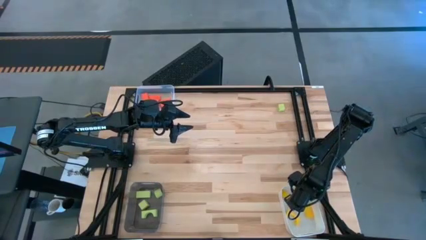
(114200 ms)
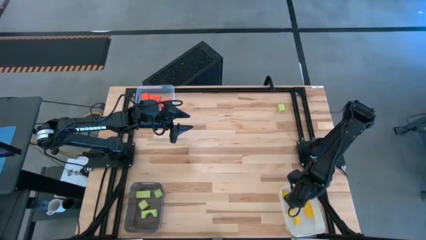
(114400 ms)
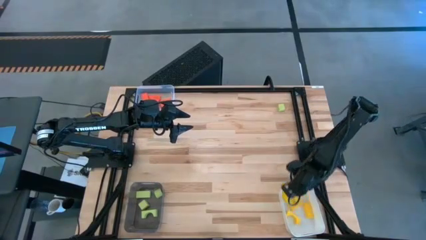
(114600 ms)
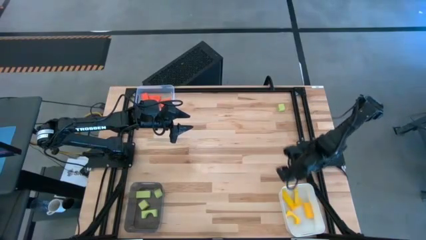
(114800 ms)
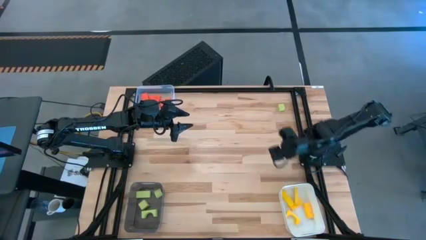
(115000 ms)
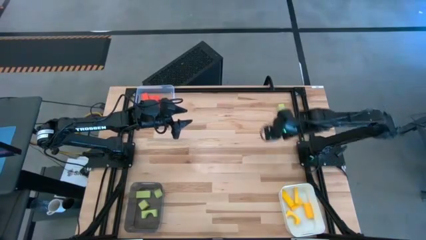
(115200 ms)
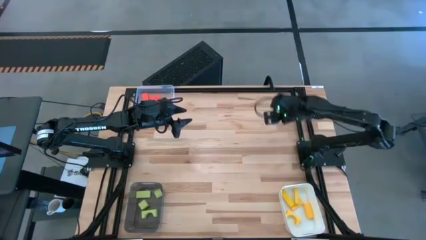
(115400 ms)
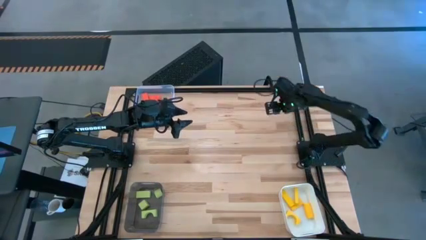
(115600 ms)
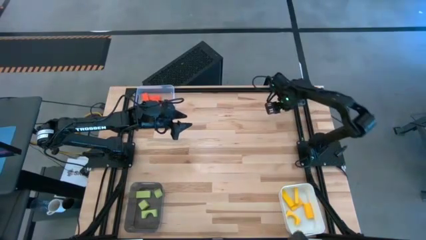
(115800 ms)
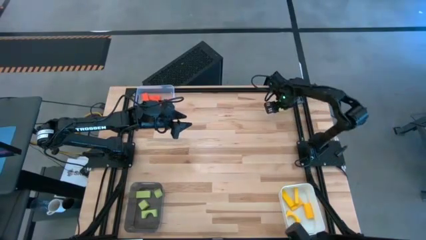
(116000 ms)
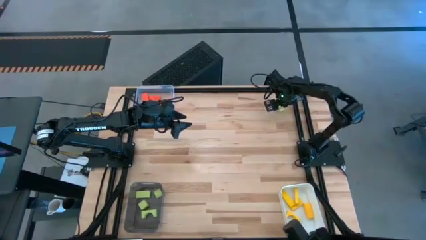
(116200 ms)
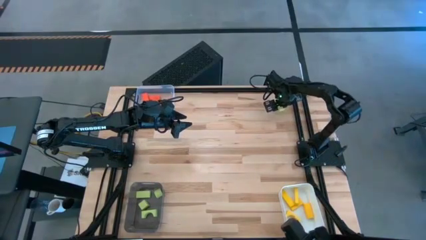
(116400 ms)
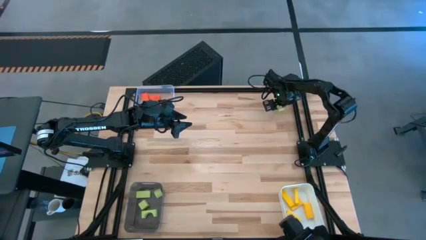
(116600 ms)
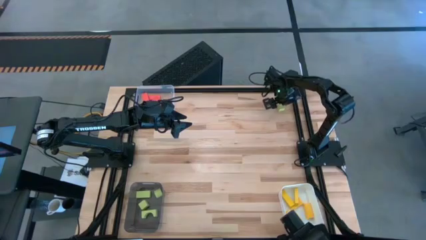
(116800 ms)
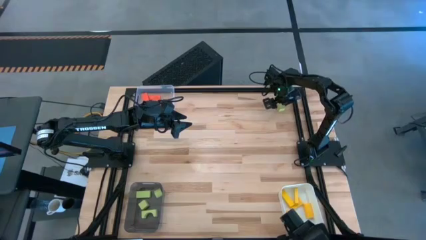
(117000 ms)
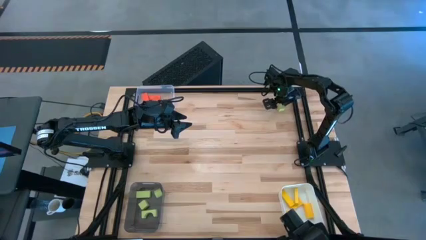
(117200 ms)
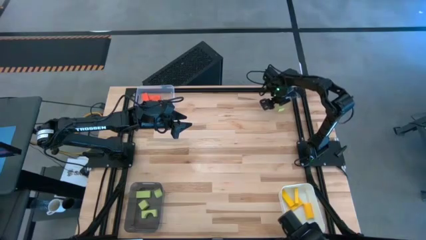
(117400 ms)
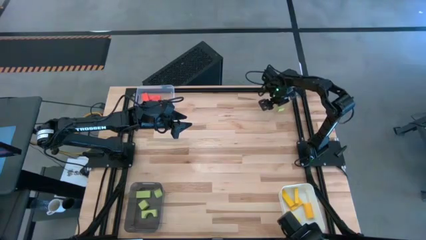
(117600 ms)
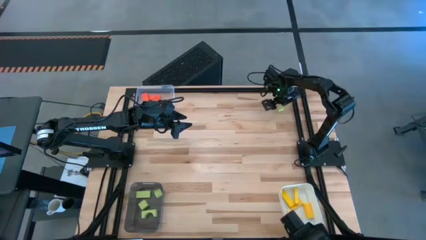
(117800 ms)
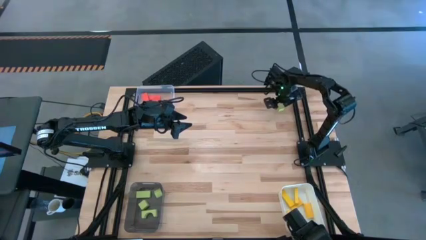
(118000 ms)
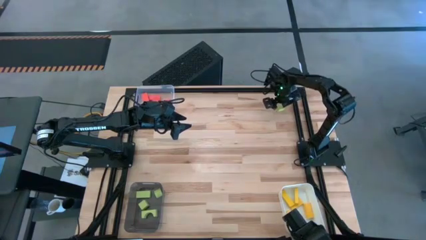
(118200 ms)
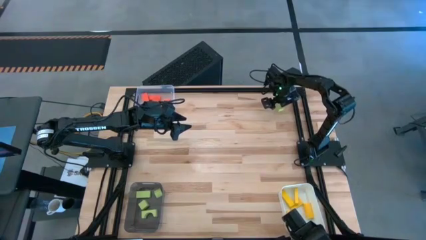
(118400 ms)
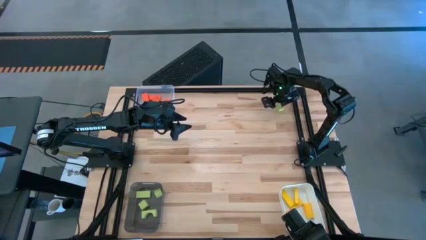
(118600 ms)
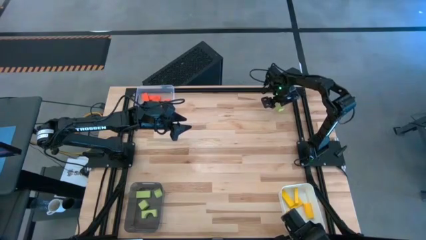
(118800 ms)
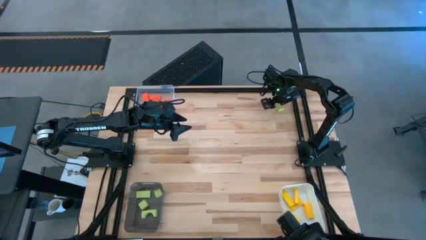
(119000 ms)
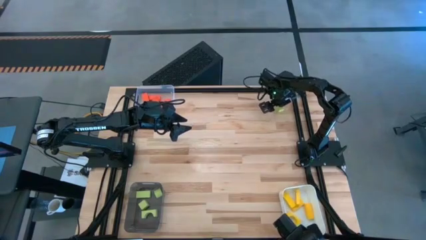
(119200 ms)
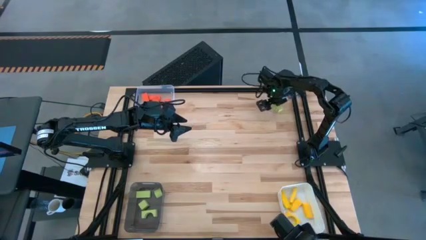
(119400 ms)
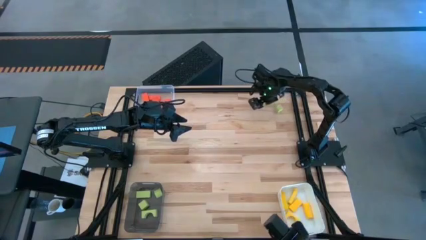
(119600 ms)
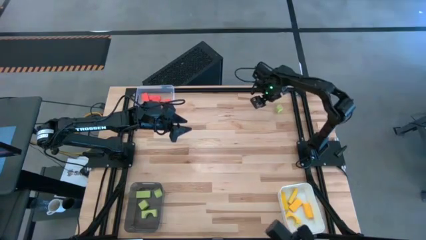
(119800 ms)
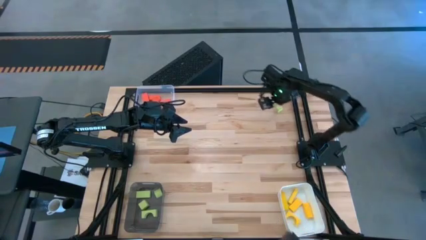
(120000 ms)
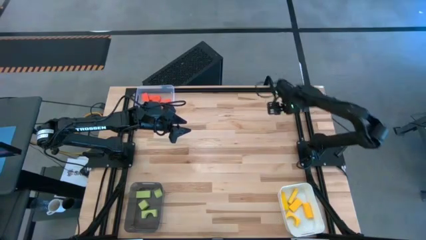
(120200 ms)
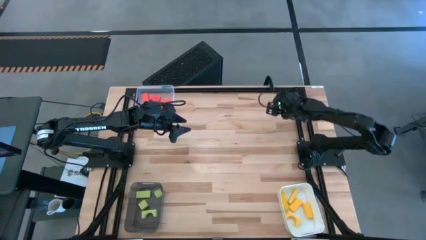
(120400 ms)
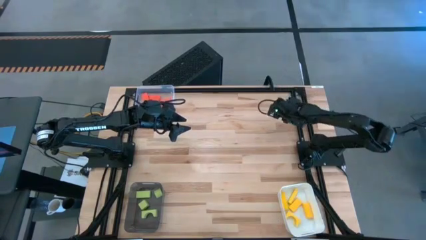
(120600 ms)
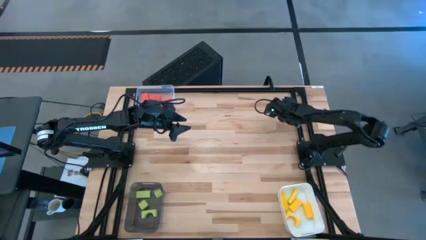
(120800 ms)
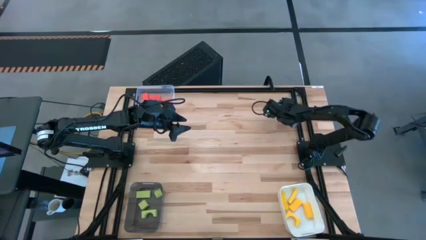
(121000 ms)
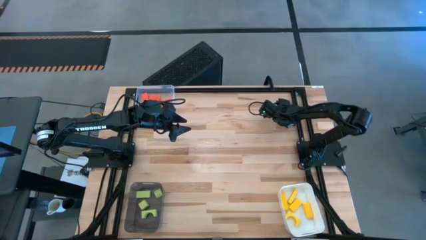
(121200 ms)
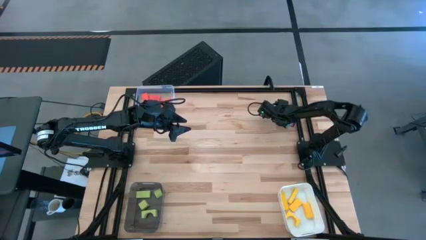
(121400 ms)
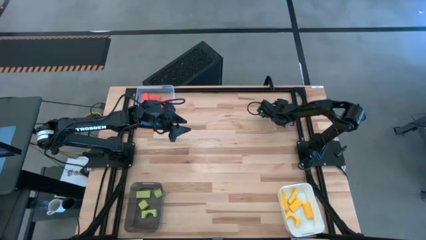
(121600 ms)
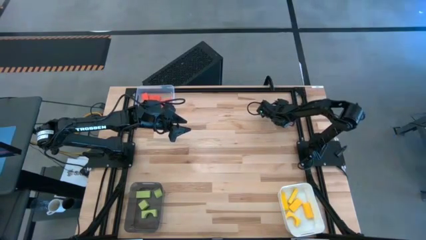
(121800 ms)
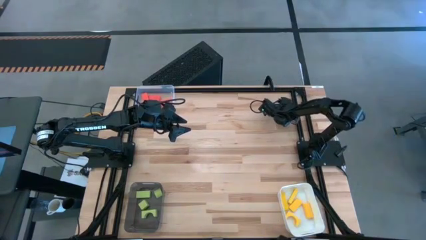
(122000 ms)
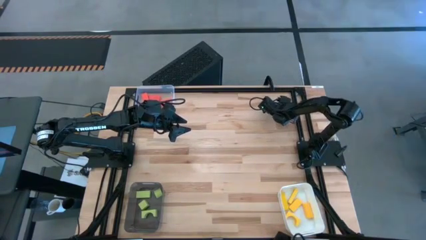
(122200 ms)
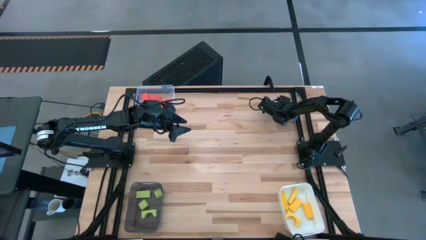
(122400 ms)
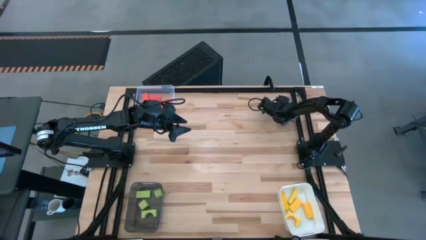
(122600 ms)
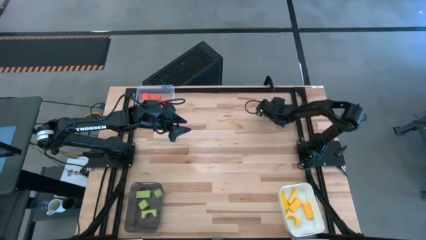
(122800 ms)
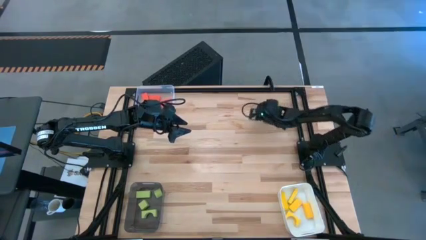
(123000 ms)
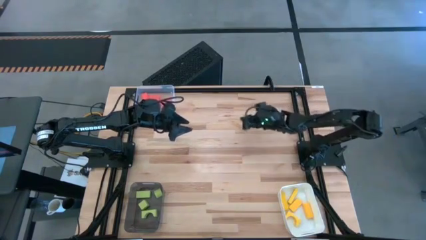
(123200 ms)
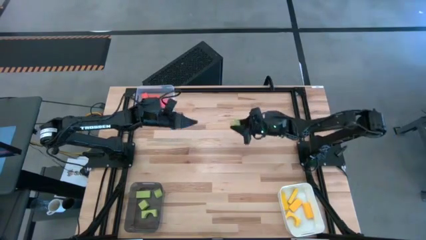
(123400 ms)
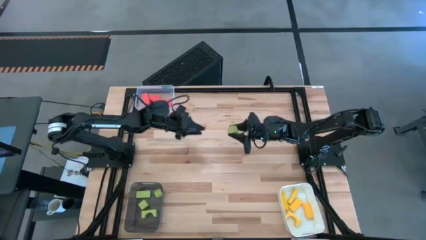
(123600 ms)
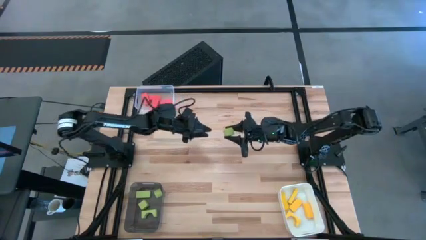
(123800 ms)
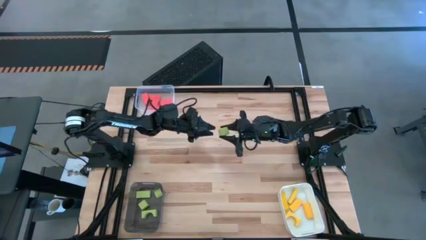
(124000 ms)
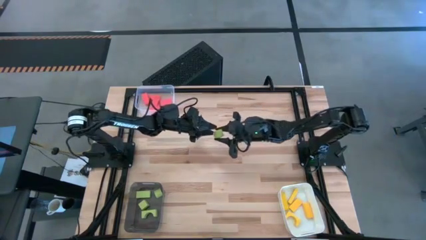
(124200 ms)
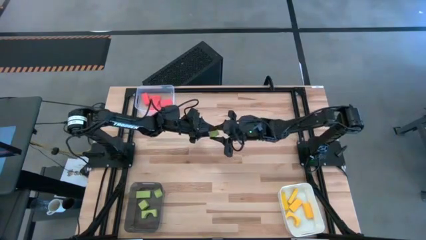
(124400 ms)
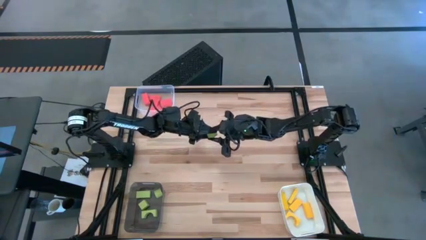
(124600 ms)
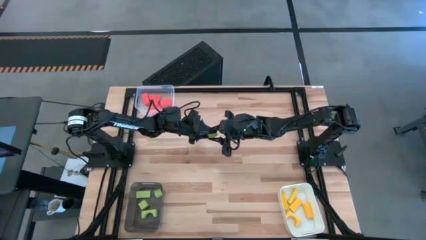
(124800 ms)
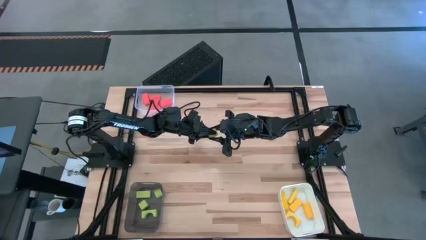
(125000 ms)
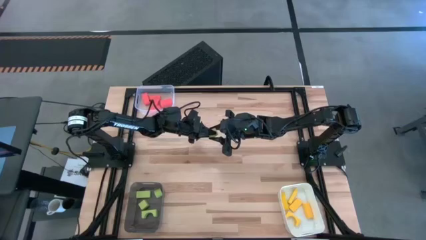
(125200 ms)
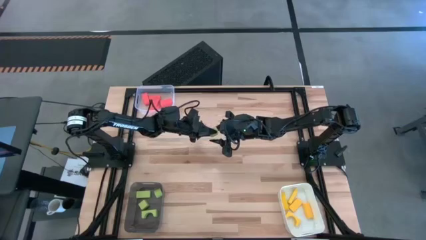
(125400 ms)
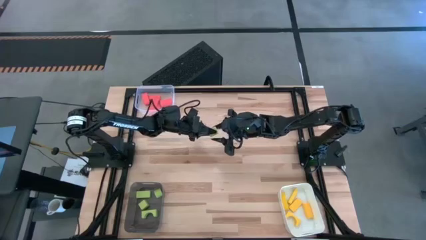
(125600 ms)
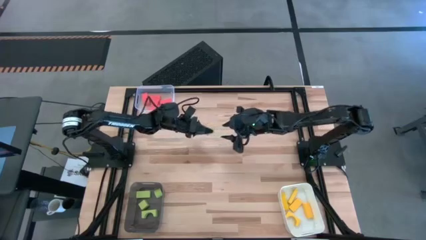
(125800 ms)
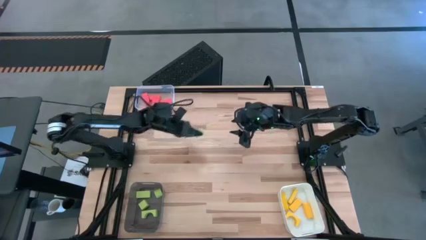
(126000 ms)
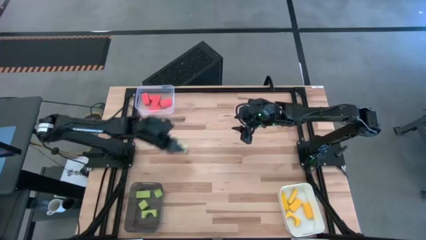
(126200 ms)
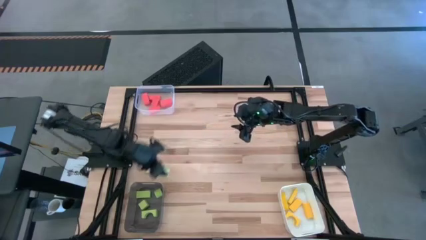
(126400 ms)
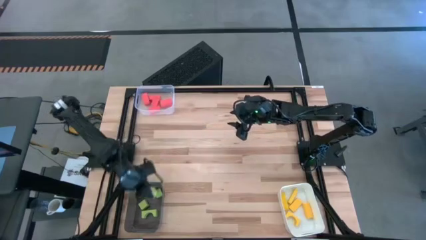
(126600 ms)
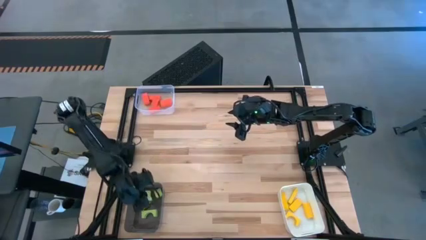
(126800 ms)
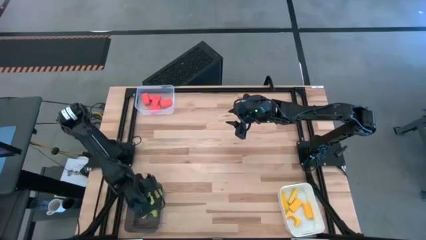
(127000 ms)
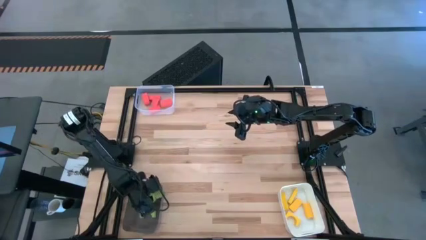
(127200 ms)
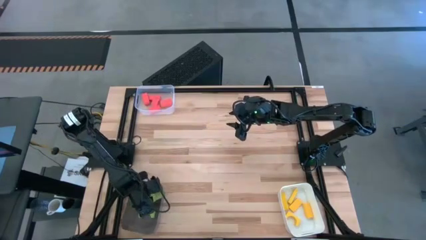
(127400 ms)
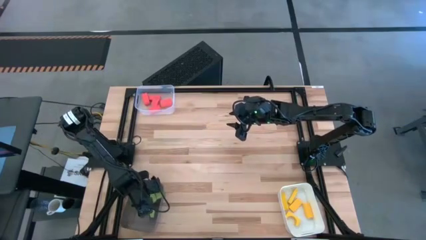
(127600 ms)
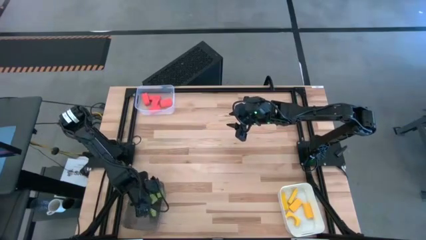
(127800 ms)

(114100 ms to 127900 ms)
Task: Sort & place blocks by color
Put the green block into the black transparent bin

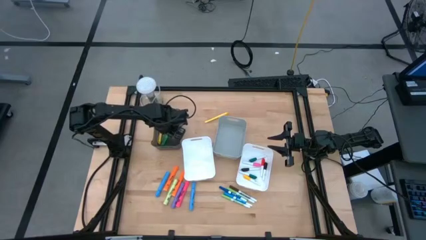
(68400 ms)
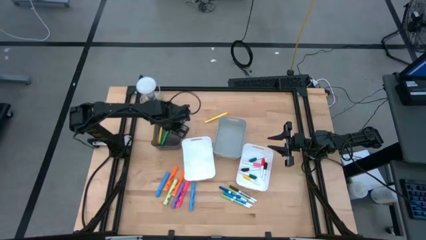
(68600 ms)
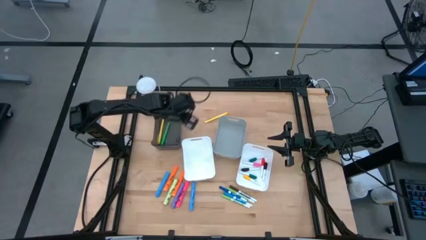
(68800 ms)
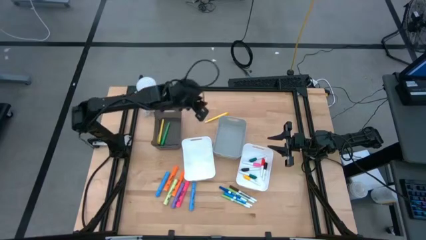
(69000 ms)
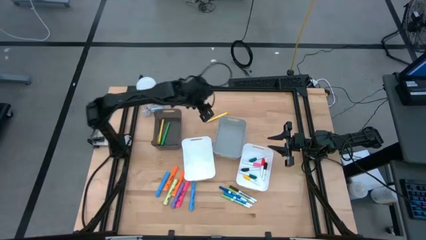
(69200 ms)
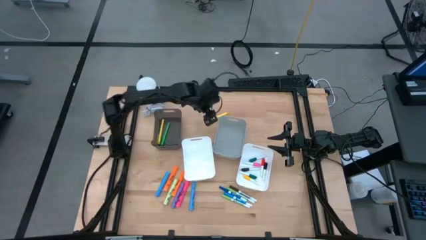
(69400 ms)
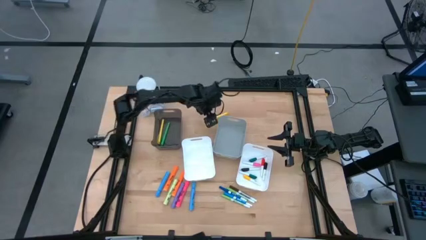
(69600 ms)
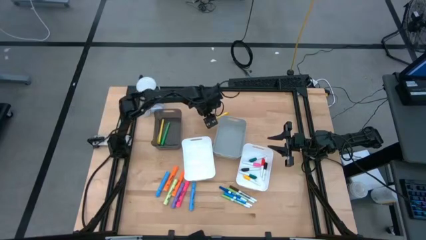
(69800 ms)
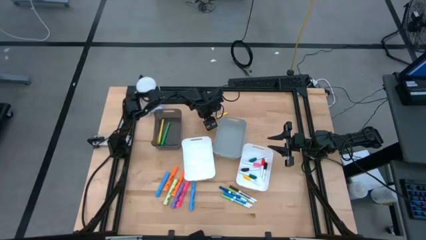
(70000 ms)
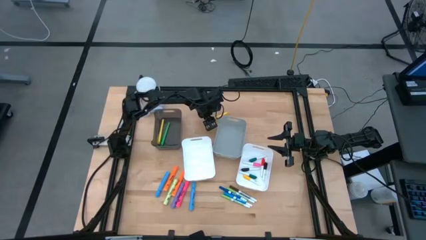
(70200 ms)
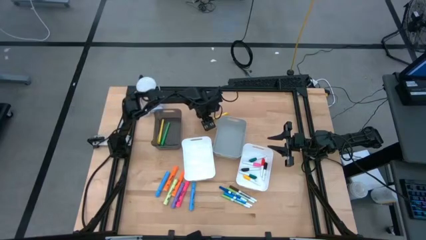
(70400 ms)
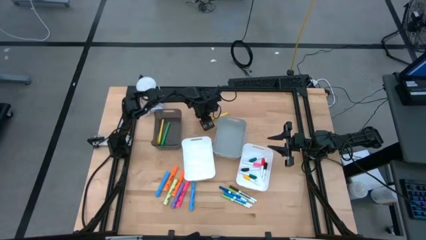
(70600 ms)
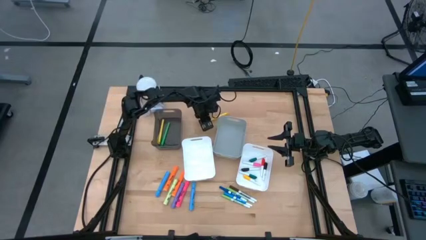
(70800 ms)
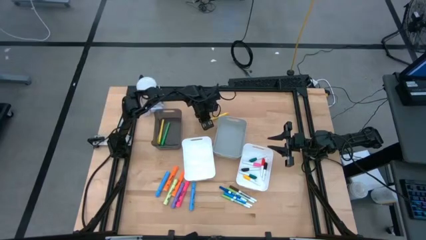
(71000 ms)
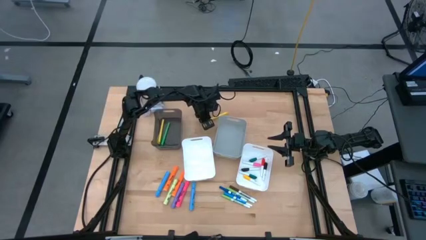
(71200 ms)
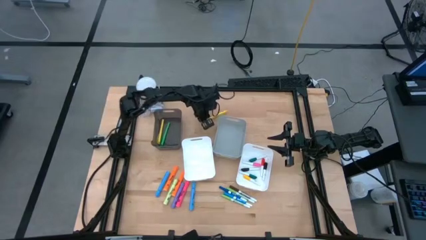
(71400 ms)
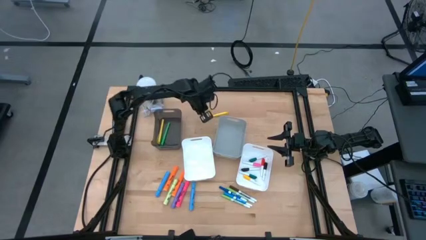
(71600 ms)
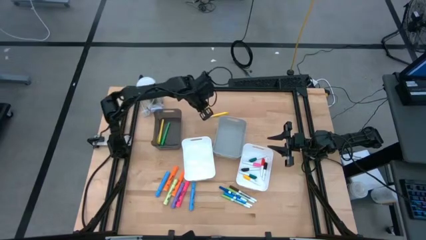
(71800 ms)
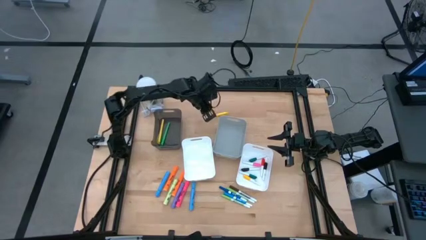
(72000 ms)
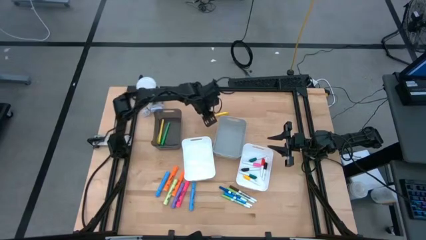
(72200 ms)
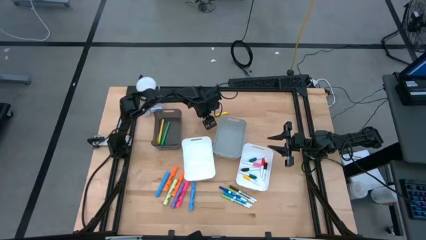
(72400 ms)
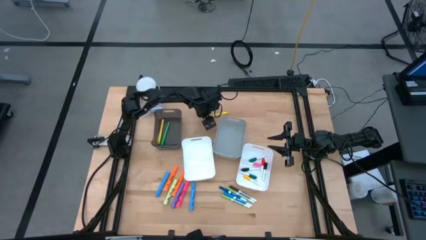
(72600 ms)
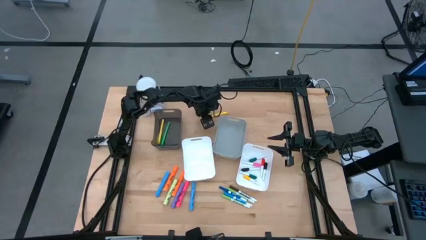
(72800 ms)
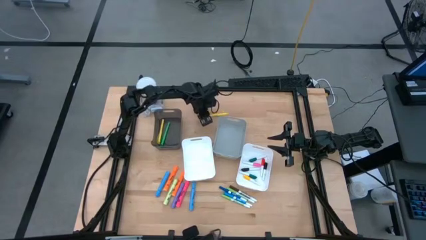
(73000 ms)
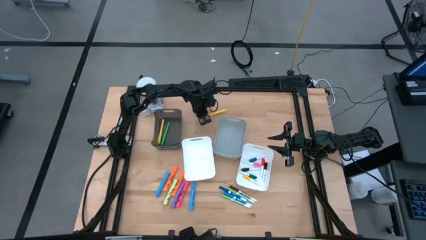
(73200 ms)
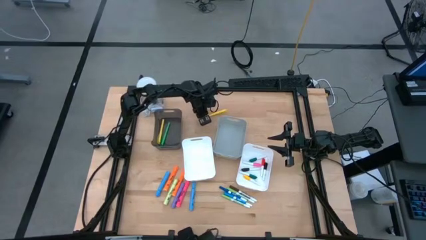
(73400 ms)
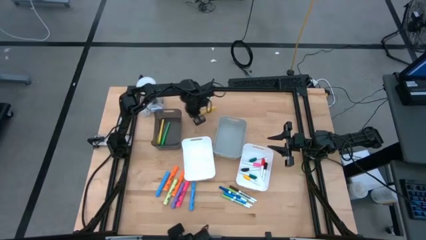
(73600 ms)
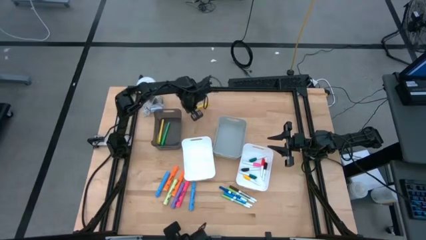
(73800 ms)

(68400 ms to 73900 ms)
Task: Pick & Place Markers
Put the yellow pen into the black bin
